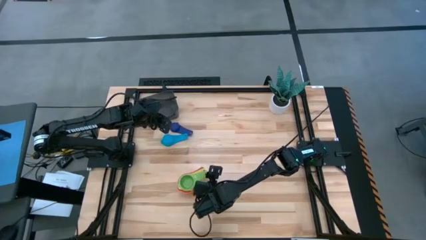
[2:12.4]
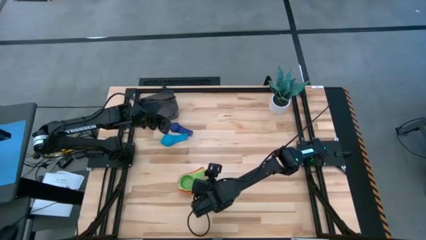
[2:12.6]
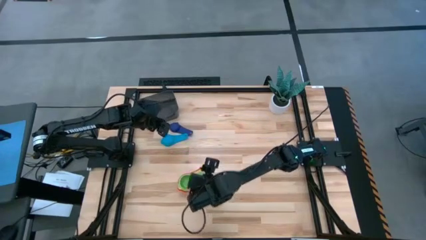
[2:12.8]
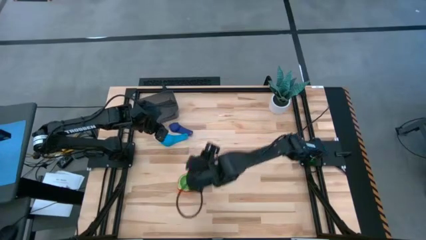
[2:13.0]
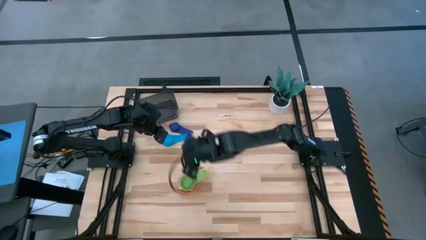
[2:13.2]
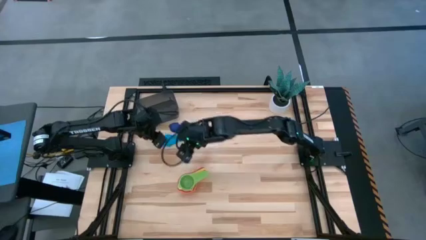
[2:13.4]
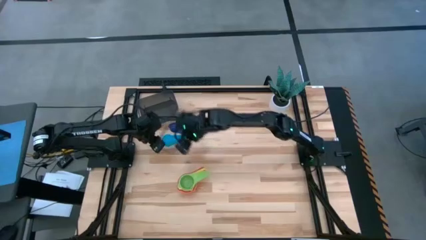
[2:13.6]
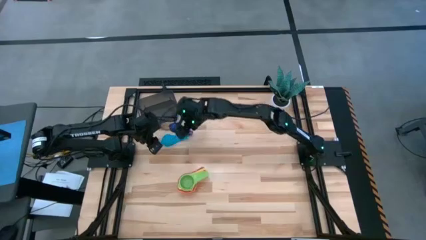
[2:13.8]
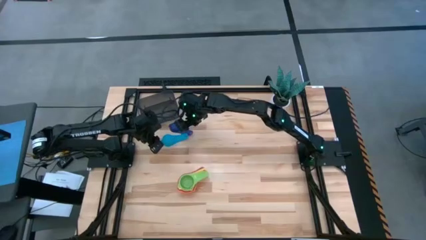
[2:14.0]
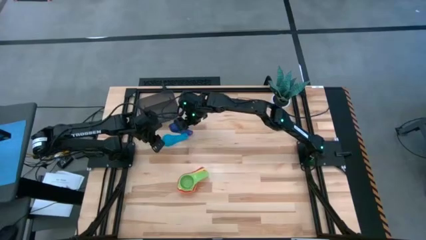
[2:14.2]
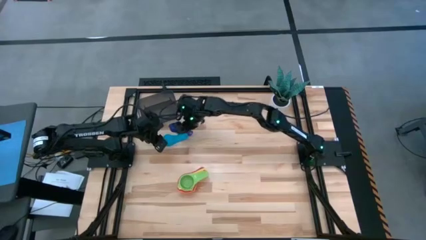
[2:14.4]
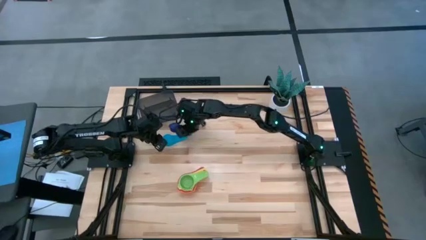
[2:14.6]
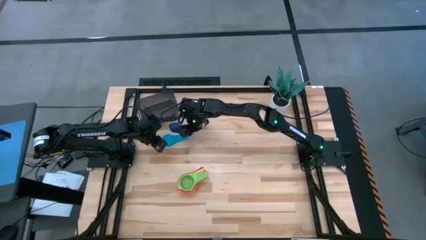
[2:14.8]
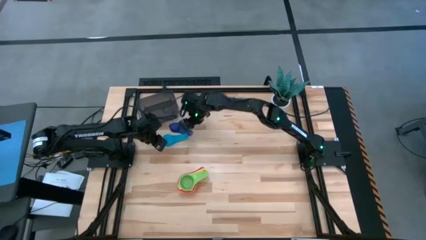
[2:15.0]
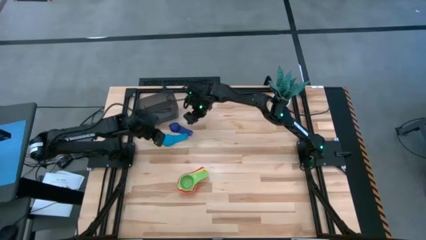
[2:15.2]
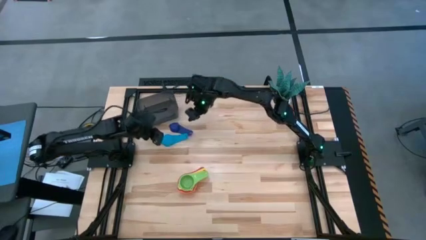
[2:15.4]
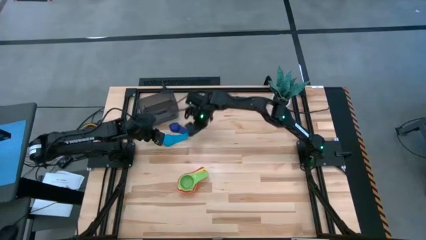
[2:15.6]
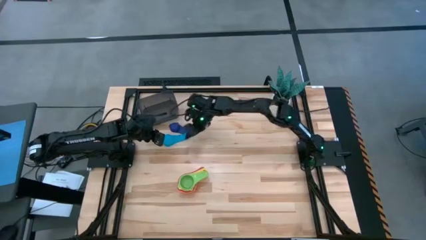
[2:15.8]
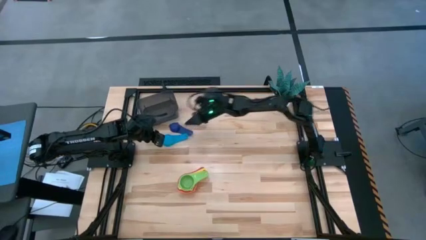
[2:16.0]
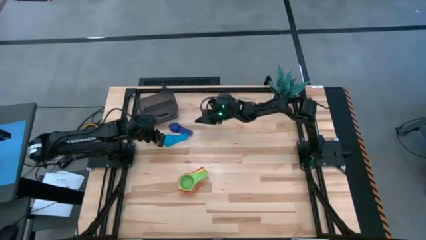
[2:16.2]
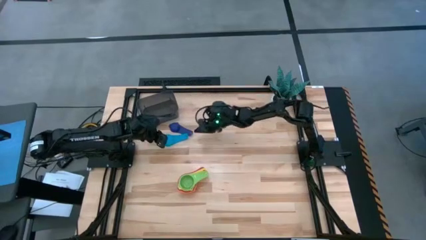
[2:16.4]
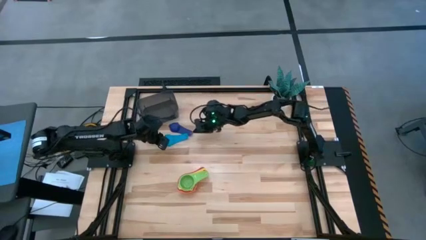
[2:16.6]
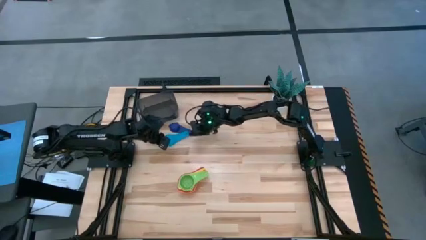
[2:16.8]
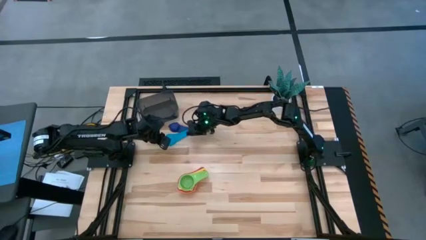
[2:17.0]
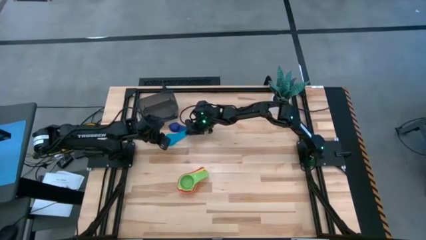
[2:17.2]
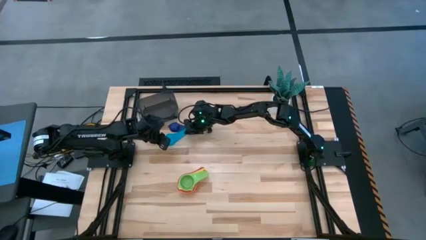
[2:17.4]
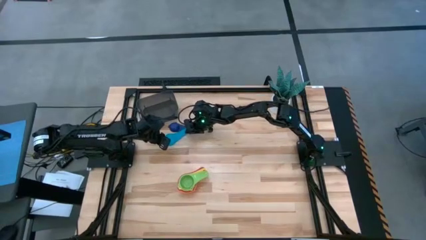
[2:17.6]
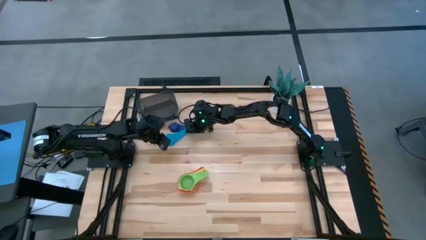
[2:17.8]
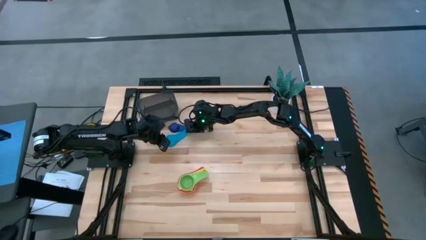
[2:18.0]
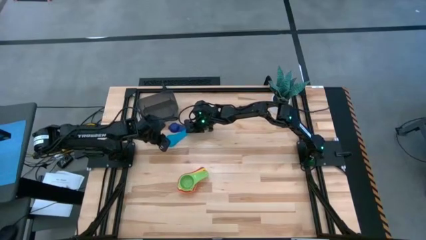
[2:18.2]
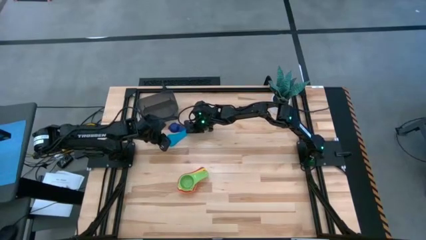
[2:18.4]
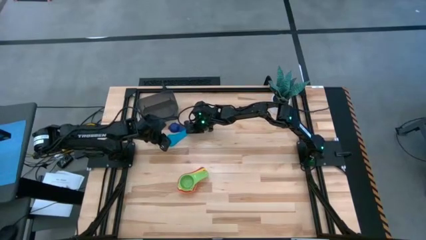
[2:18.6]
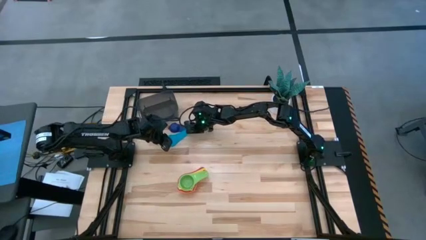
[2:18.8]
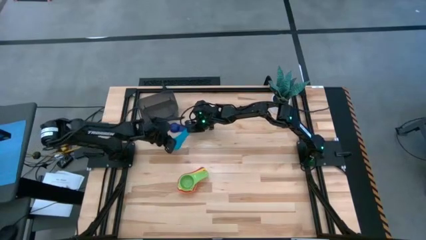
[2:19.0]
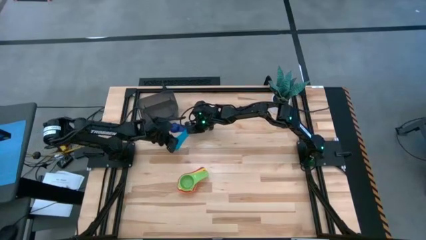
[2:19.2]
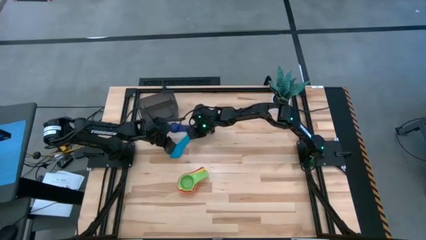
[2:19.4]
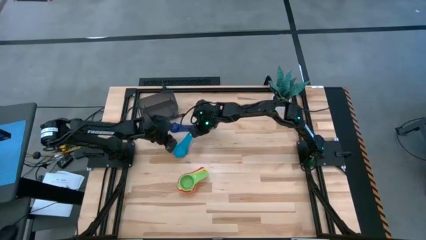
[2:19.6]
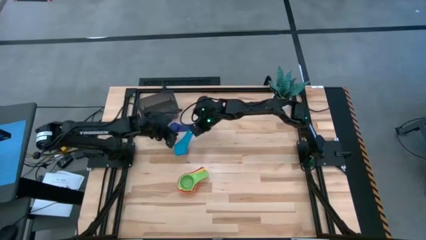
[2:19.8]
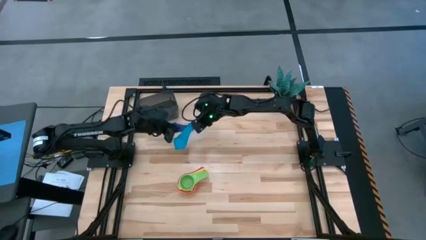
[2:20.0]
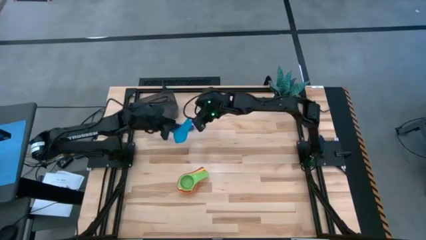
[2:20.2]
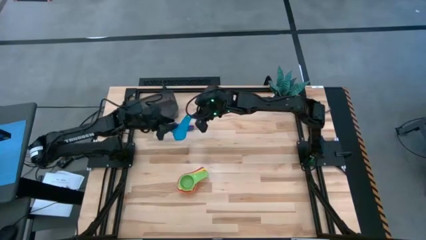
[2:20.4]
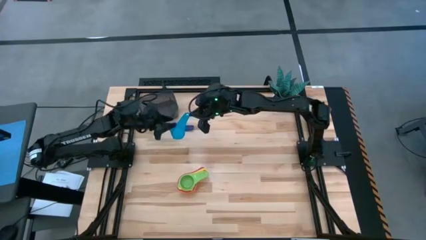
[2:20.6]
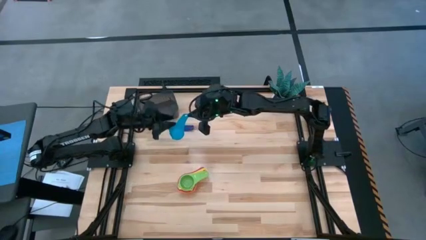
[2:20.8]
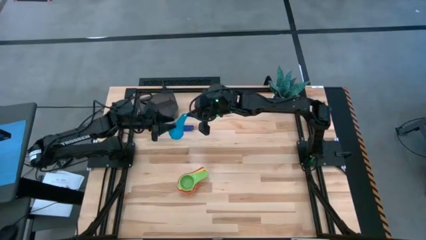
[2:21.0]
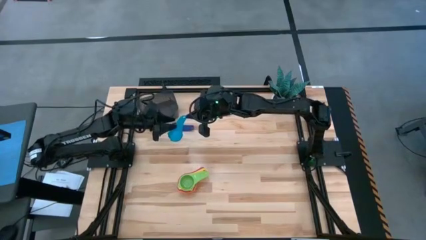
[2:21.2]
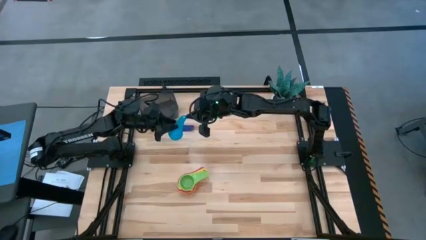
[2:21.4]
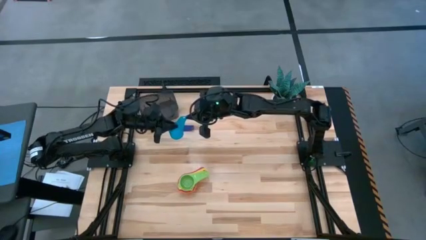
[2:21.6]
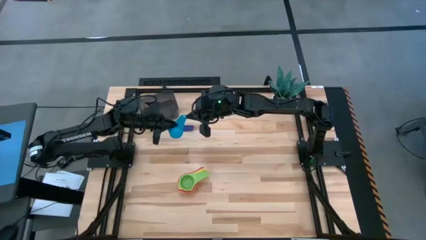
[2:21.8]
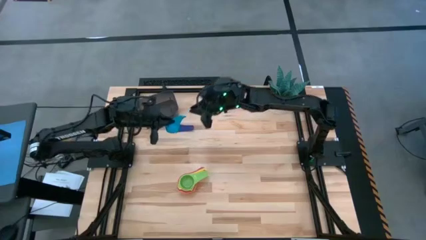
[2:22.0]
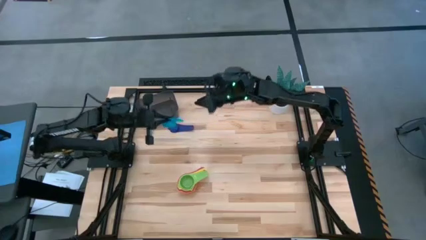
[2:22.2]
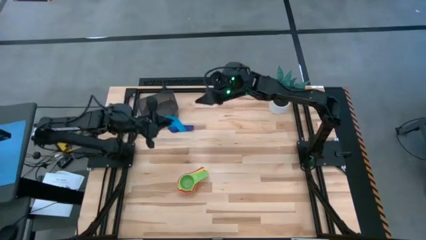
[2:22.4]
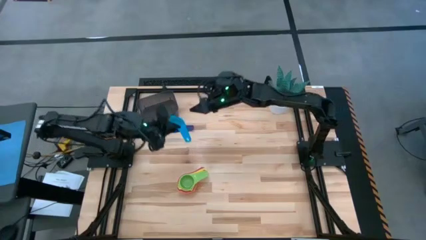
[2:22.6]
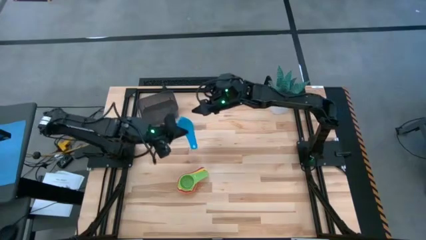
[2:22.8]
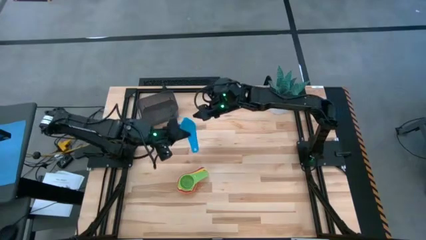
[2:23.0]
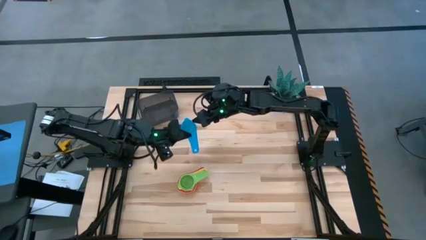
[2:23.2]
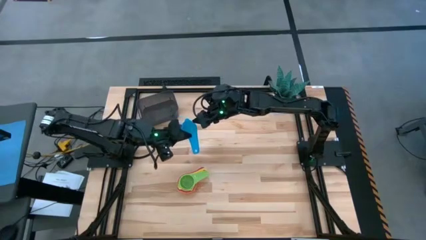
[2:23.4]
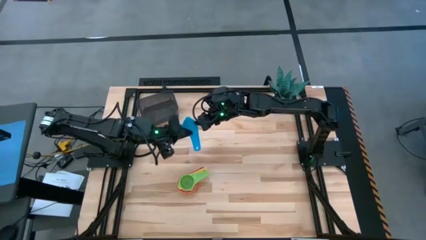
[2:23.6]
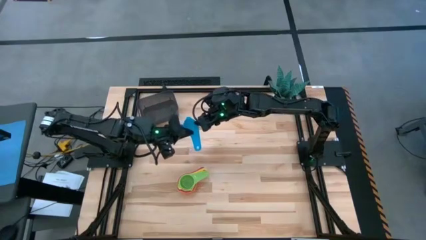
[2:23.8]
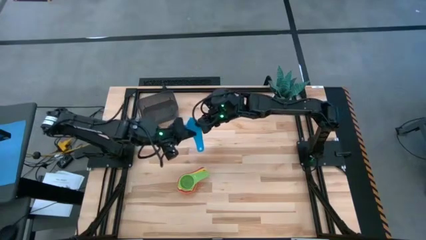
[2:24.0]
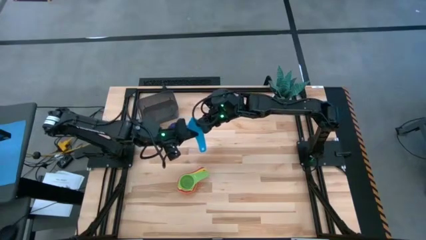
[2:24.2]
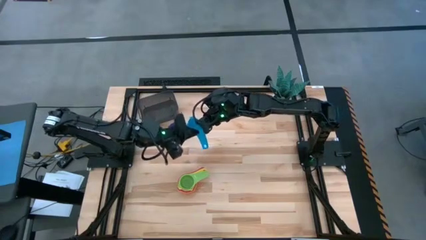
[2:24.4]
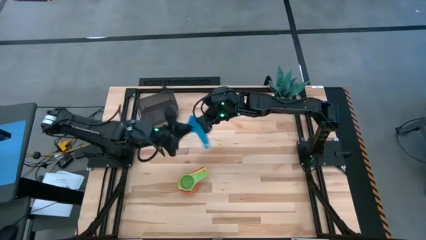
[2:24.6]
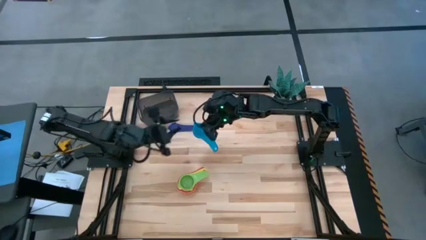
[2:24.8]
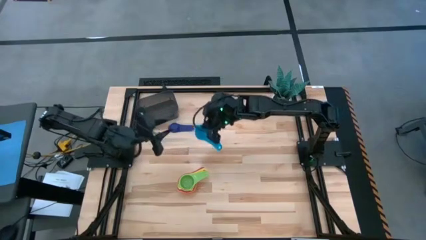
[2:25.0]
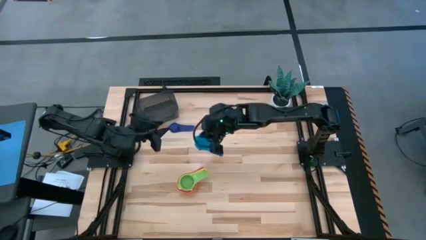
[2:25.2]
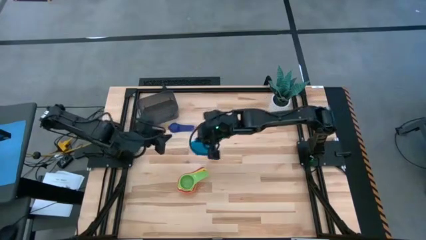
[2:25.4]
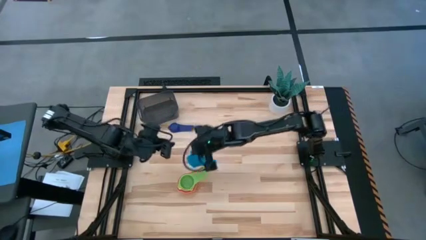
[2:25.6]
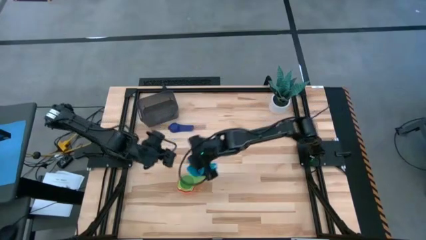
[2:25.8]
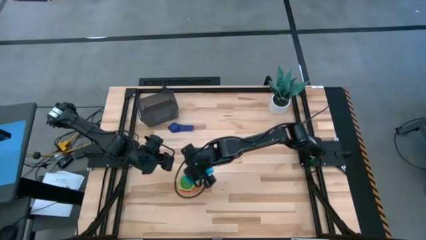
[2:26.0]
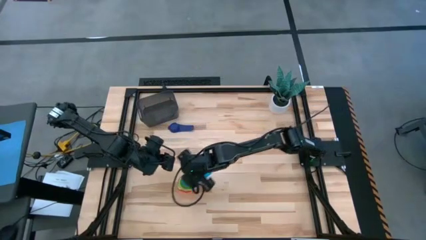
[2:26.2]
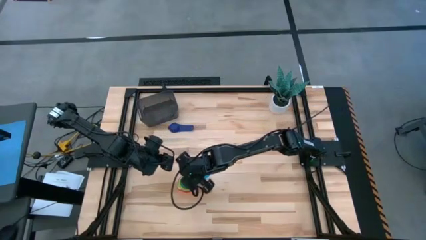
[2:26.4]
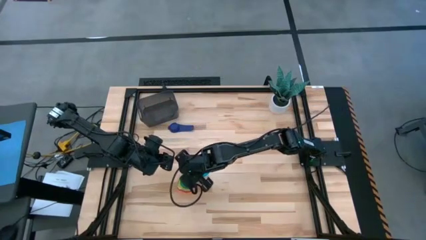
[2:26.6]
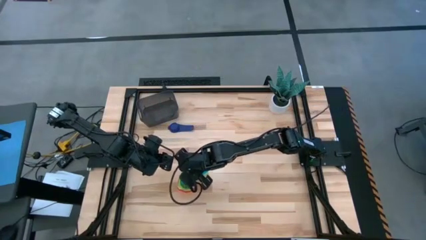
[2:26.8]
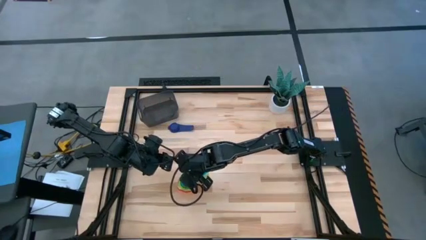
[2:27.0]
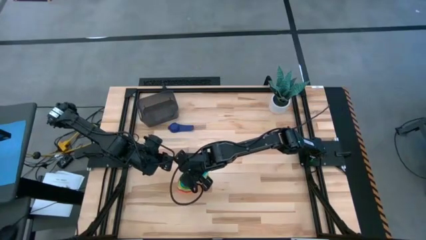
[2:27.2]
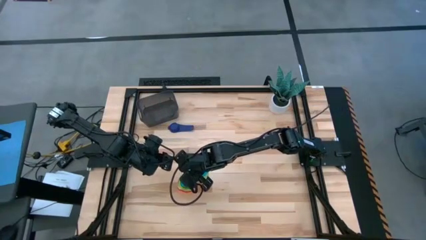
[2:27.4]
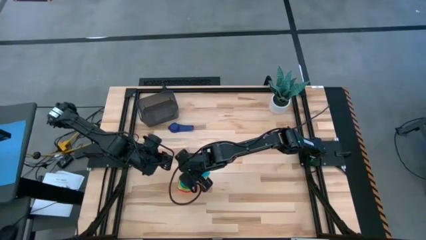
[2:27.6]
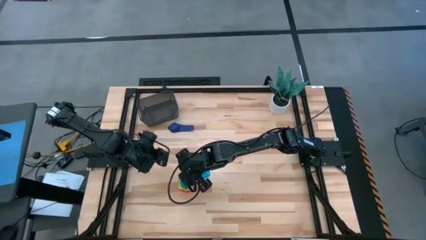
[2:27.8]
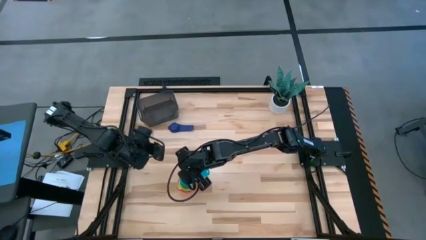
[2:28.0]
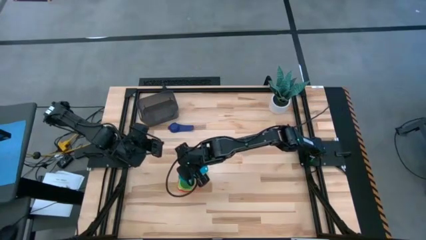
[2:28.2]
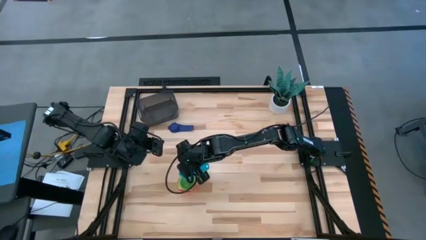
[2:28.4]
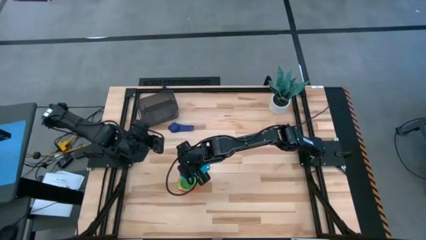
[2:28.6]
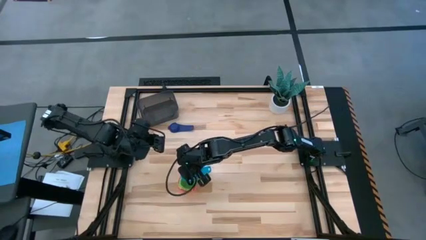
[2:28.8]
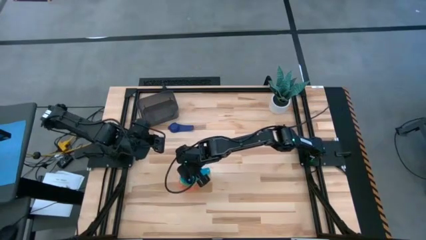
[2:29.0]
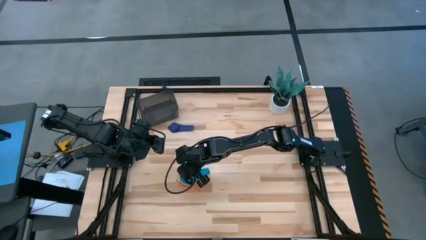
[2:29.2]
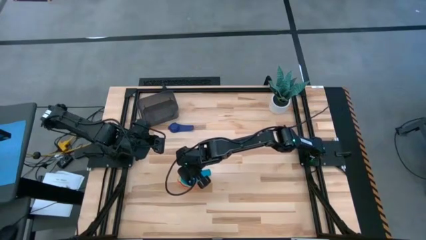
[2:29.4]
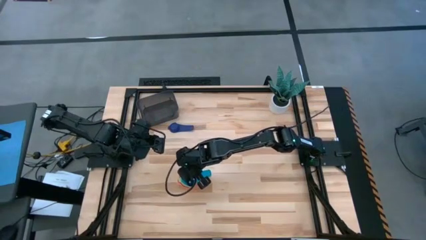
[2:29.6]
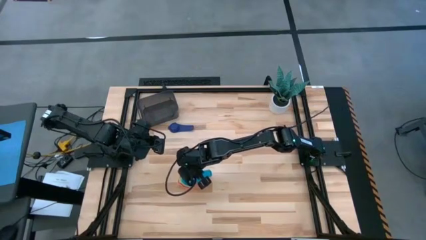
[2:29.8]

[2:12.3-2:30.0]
Task: Nest measuring cups in basket
Stack the light blue measuring cup on top of the green measuring cup
